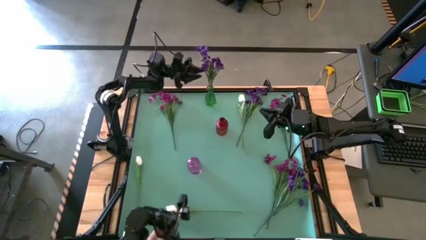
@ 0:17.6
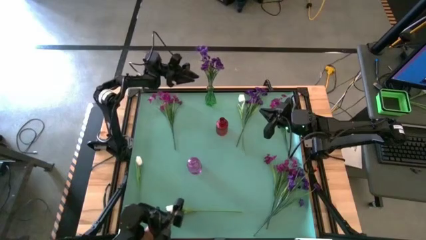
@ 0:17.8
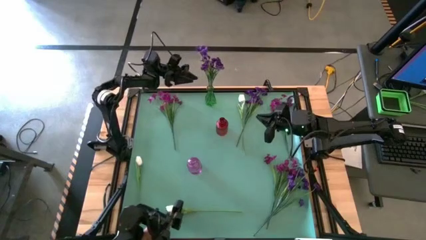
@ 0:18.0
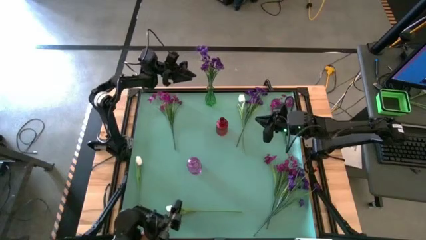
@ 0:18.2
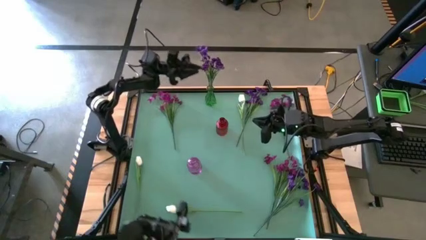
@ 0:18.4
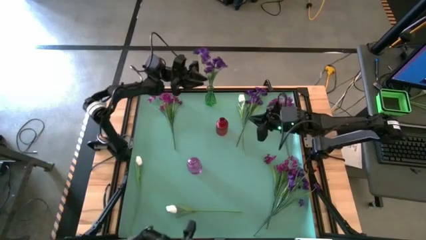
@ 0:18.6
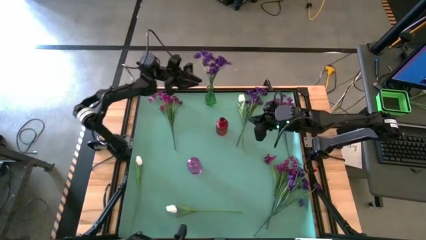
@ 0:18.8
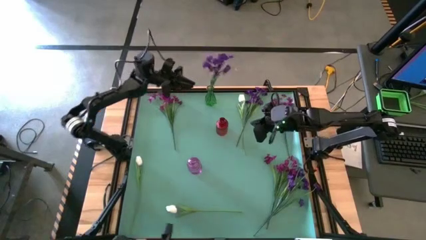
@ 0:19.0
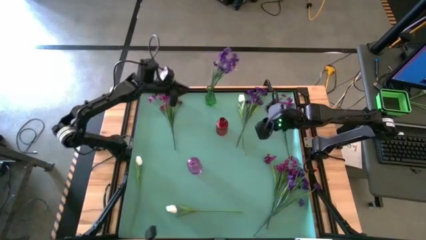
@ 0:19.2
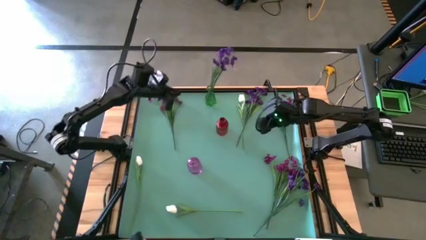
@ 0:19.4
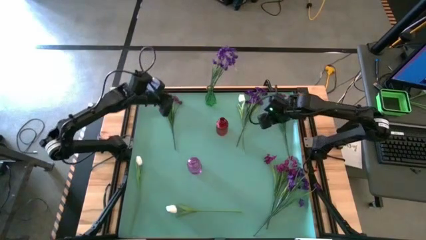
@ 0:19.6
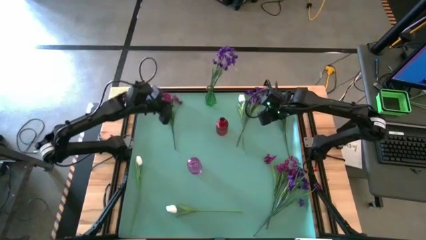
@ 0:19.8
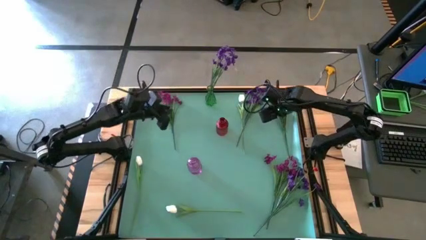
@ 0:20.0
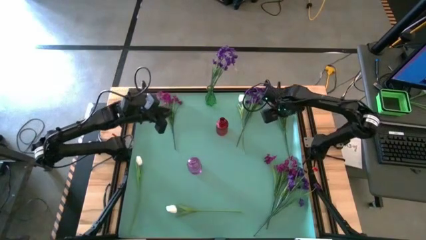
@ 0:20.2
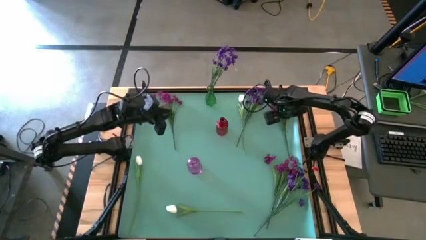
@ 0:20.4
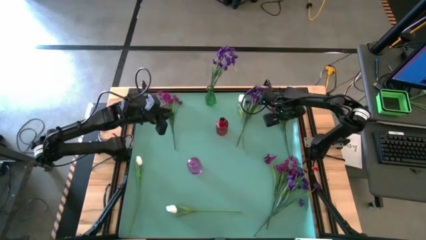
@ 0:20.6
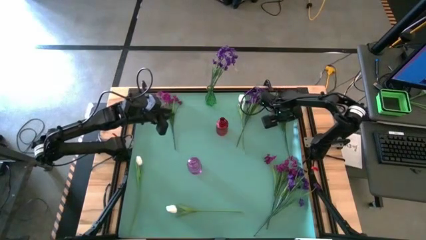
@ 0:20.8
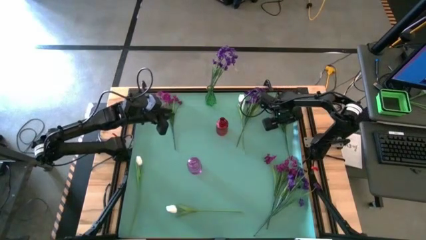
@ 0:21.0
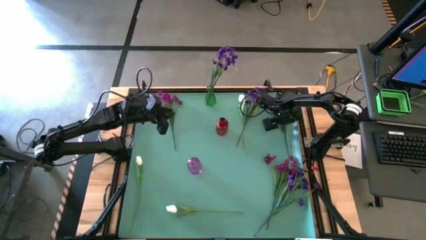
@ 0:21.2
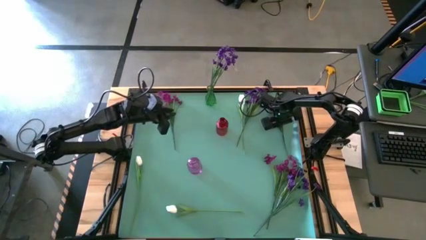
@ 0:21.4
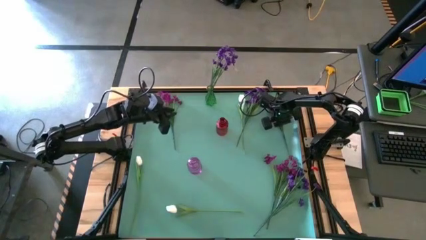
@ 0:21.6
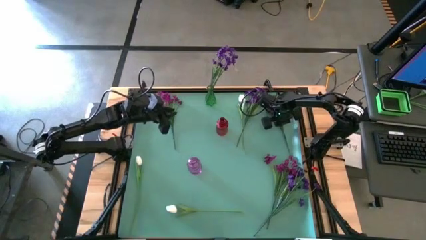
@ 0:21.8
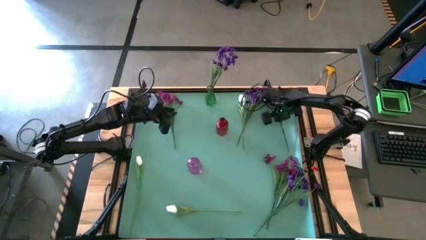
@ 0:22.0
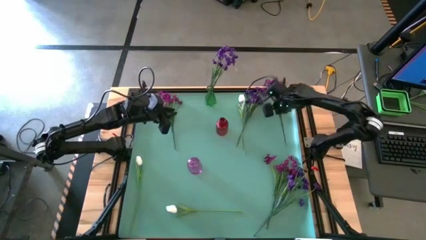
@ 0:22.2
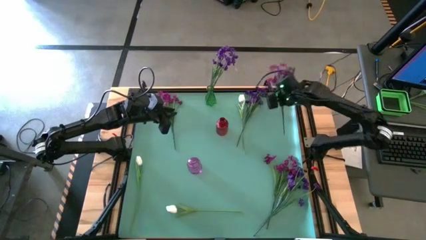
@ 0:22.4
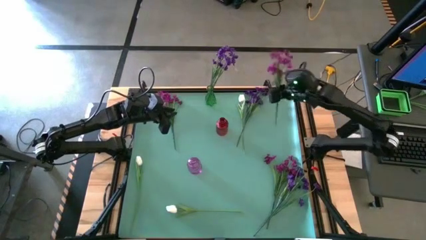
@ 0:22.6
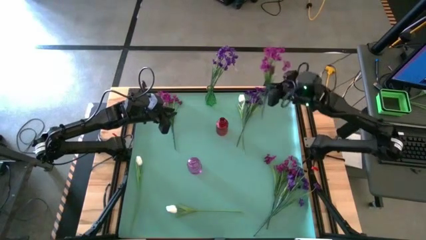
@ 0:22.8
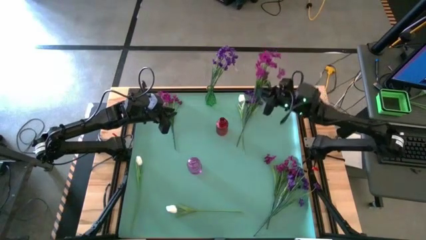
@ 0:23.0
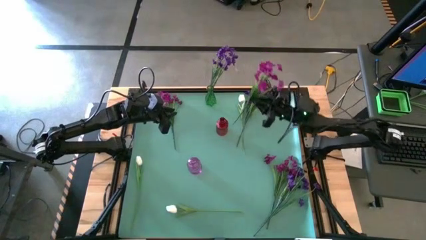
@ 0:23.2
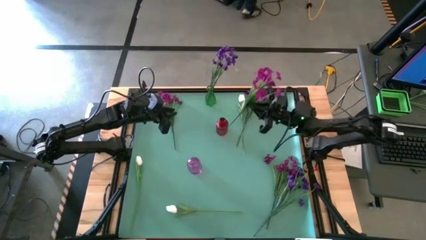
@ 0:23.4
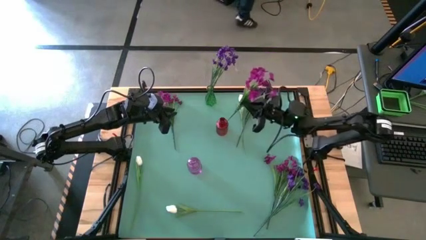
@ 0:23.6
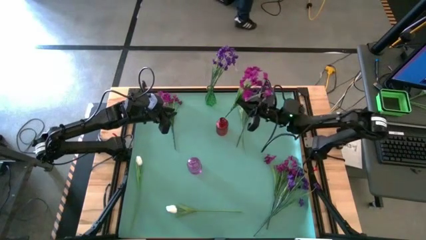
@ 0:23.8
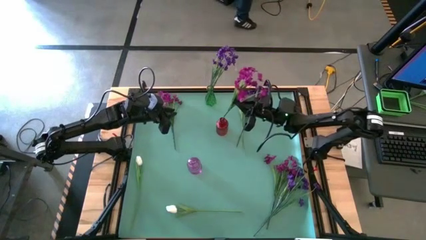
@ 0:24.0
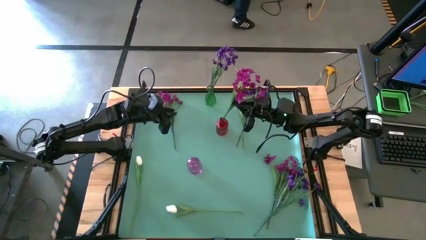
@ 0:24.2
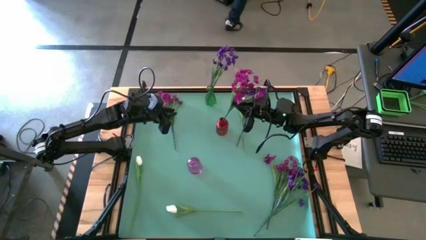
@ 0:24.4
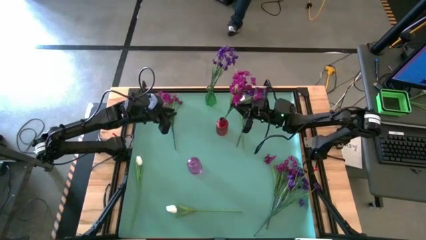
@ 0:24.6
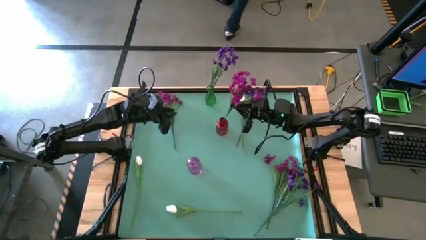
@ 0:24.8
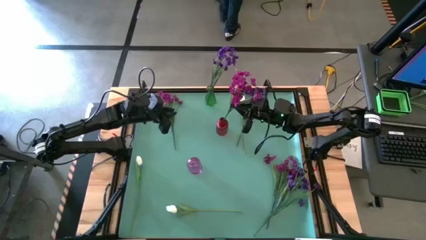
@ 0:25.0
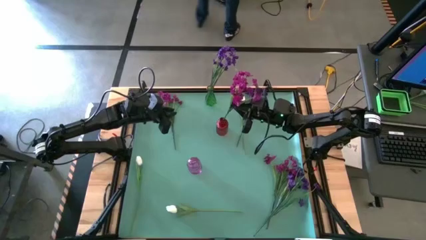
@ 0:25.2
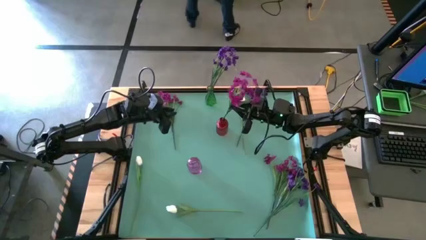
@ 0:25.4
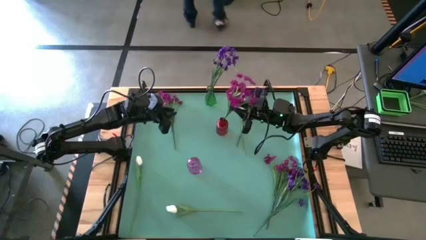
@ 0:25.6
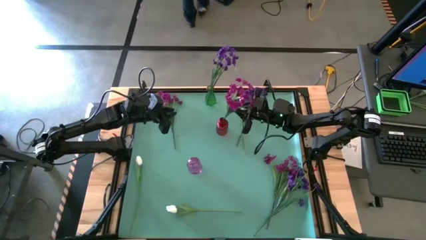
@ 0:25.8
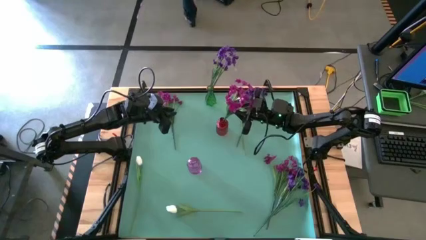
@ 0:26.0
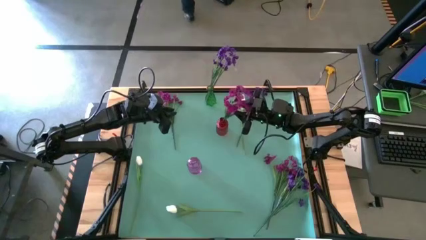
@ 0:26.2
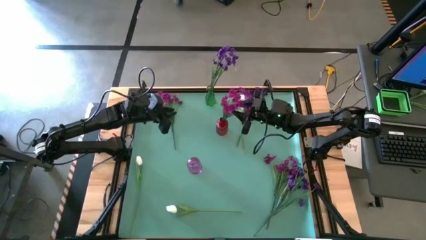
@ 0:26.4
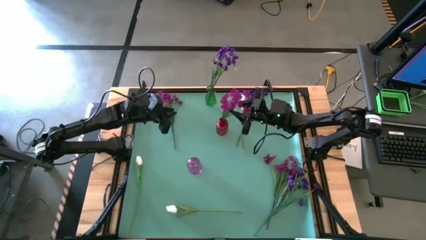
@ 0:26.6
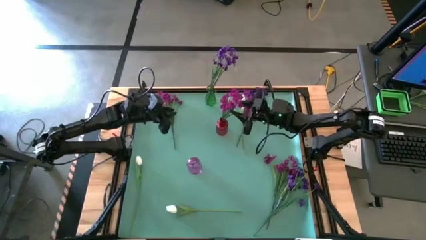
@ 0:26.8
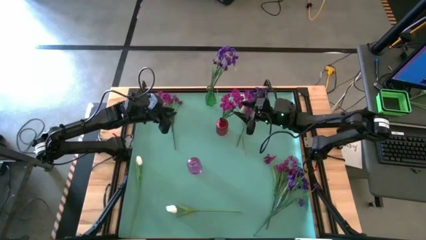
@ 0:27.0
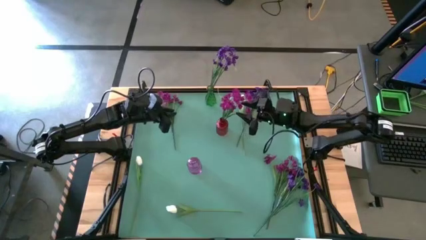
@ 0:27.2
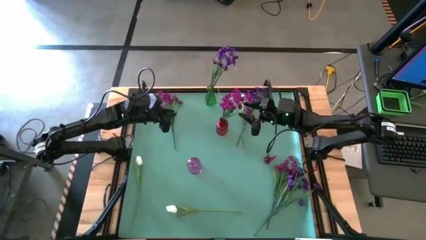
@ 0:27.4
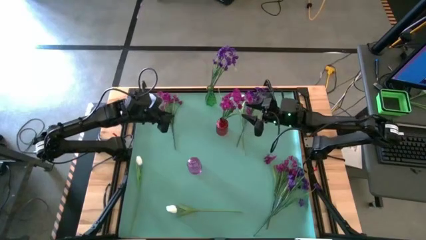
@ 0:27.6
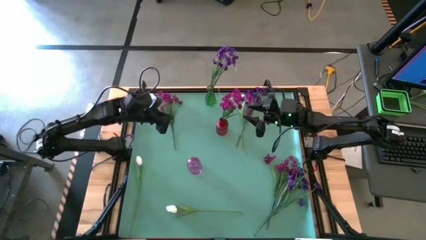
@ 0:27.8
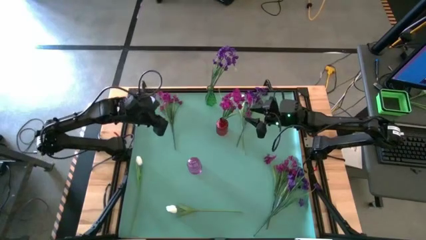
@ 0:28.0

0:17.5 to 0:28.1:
Task: Sort flowers into vase by color
Put the right pink flower into the red vase

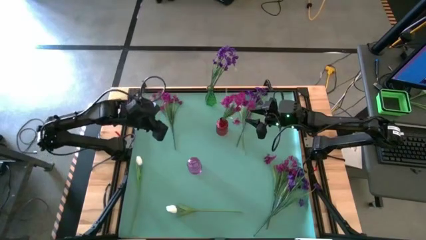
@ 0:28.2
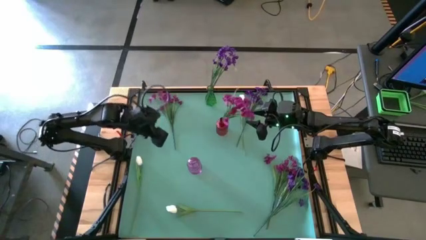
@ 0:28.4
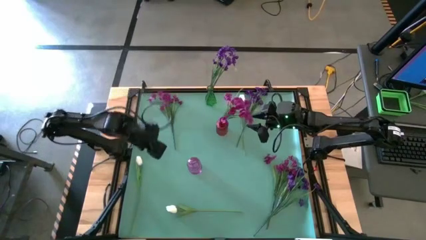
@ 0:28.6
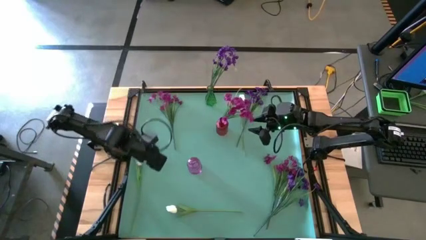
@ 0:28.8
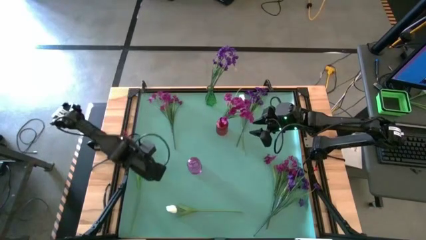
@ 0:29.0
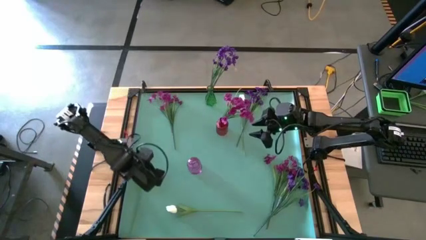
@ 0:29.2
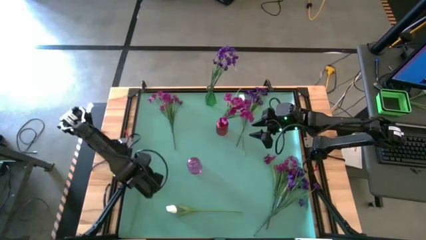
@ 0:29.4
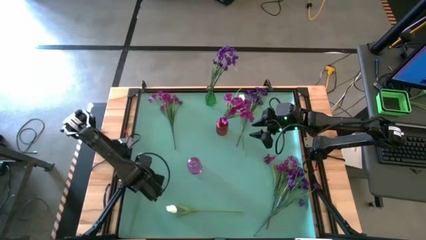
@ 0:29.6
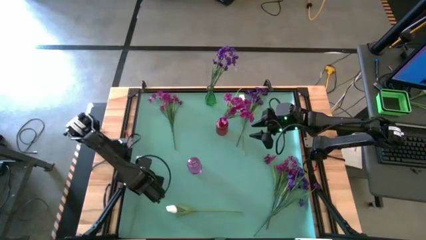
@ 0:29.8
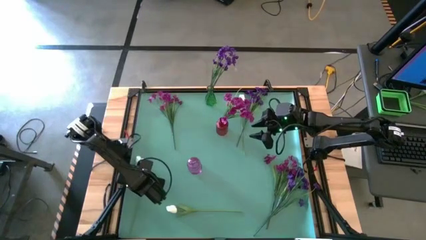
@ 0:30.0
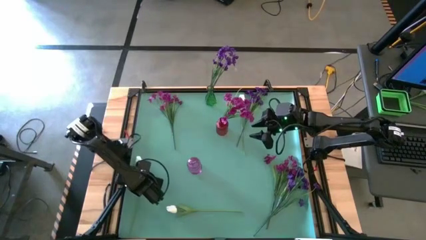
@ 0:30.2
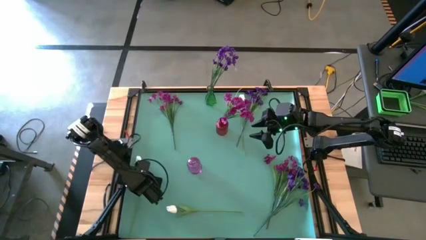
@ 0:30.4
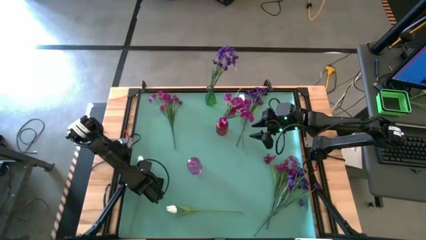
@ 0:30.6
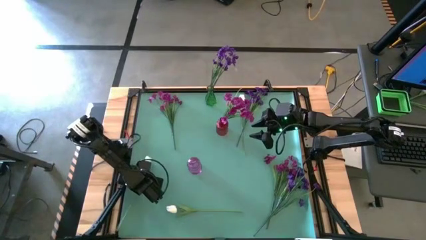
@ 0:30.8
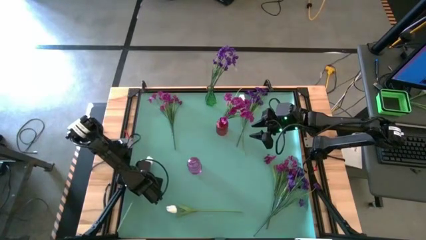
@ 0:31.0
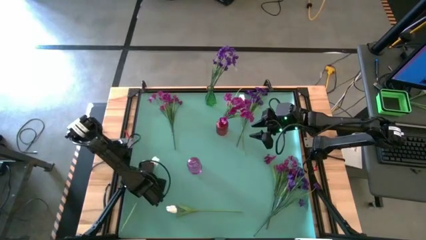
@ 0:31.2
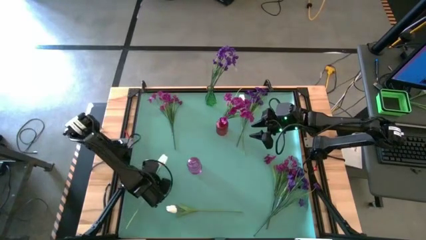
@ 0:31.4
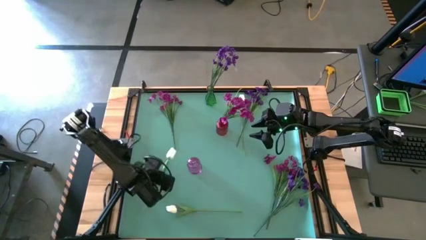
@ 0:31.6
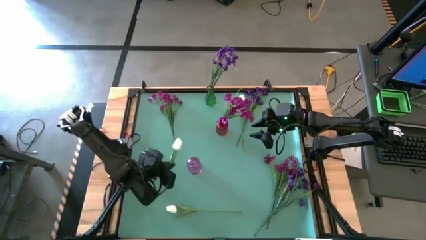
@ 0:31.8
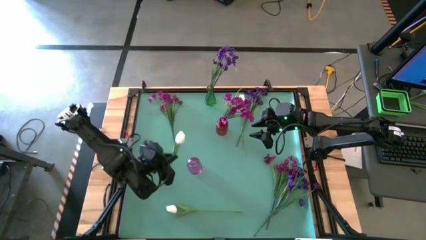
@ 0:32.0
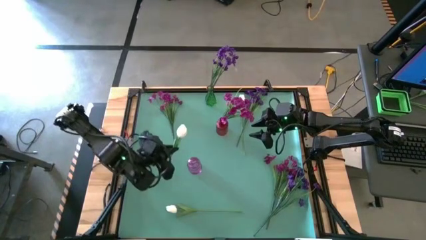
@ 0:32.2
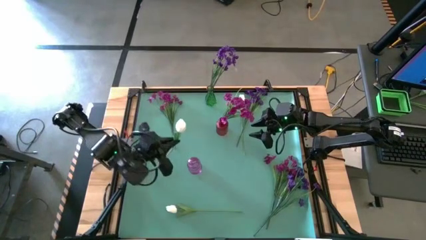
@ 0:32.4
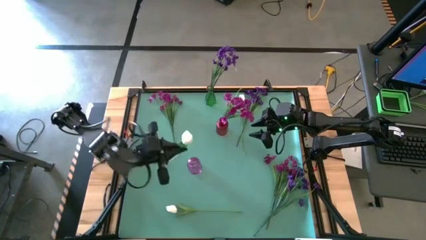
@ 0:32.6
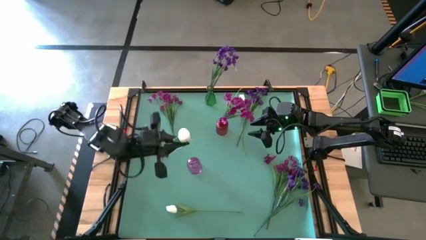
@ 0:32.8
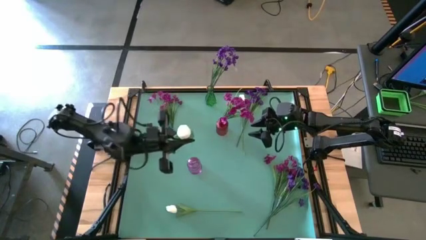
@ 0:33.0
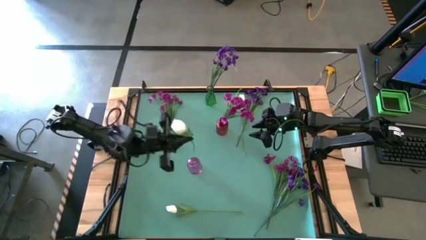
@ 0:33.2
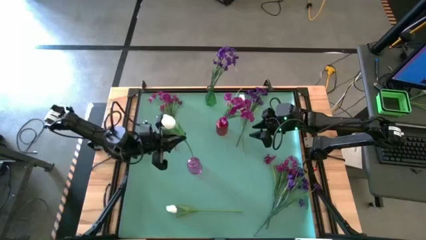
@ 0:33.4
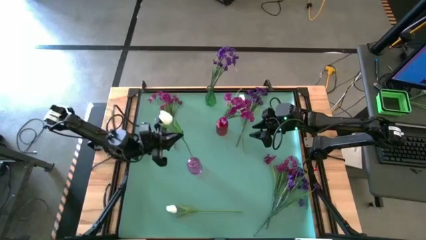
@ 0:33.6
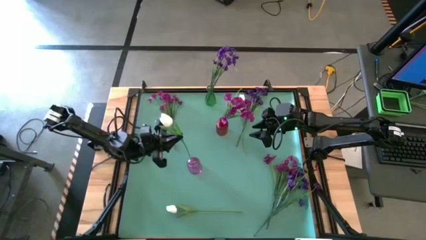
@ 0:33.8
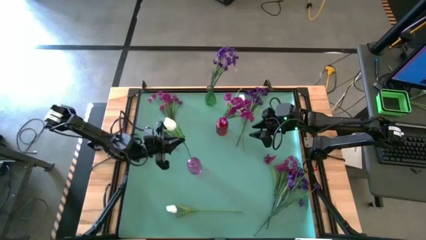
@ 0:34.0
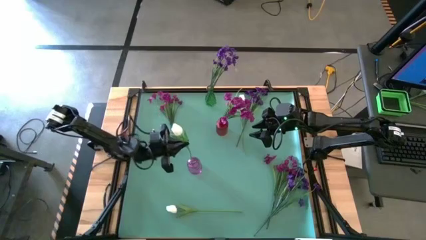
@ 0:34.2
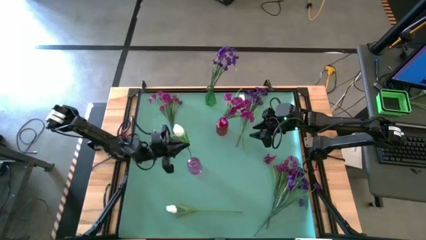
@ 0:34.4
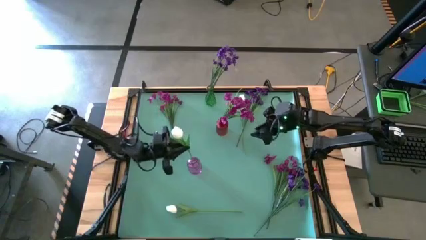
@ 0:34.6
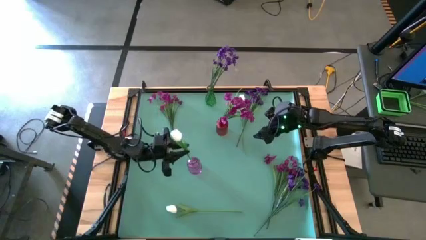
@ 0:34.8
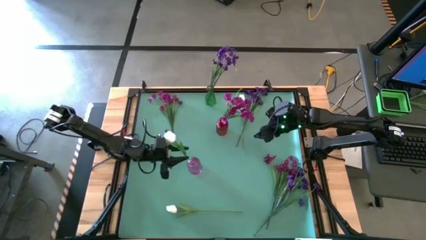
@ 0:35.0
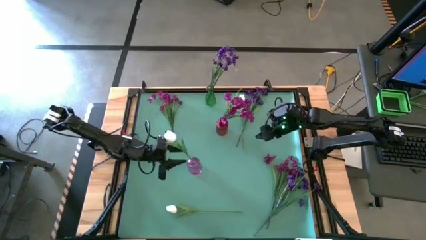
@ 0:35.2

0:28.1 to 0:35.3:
Put the bottom left white flower into the purple vase
